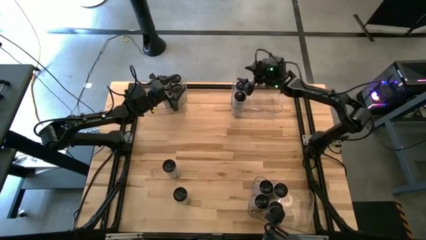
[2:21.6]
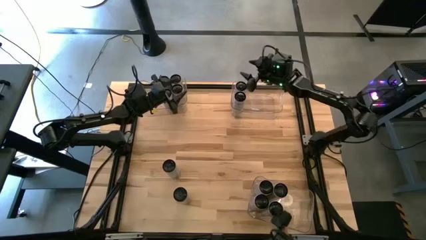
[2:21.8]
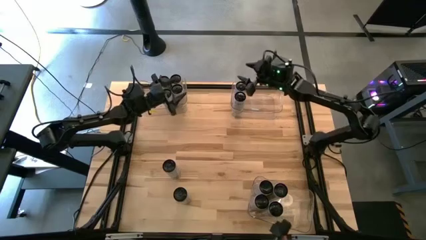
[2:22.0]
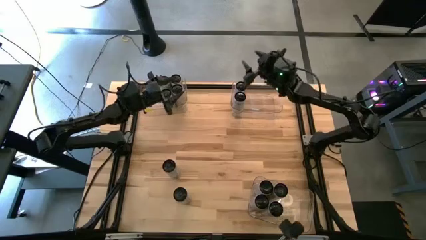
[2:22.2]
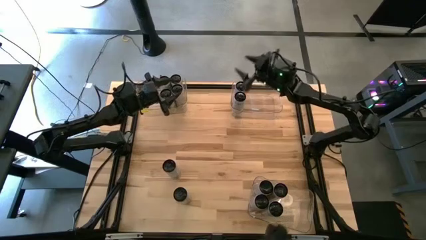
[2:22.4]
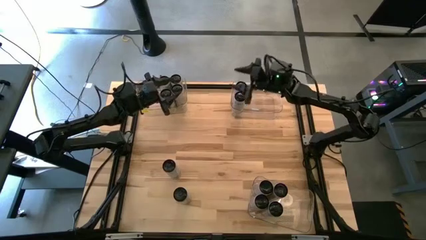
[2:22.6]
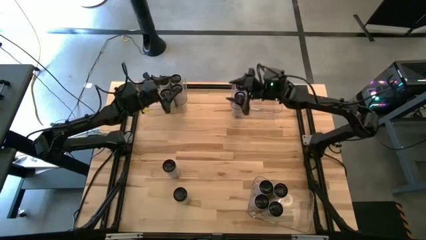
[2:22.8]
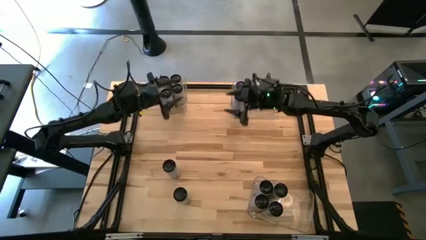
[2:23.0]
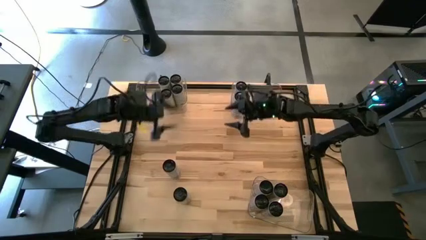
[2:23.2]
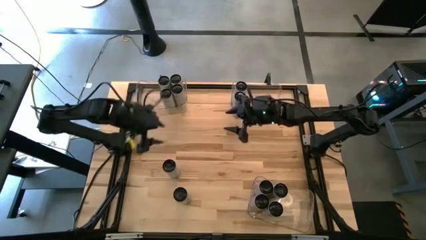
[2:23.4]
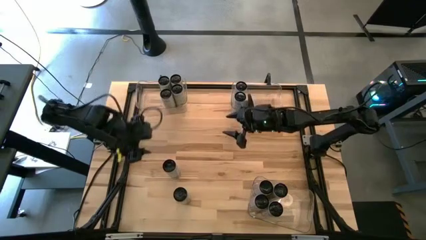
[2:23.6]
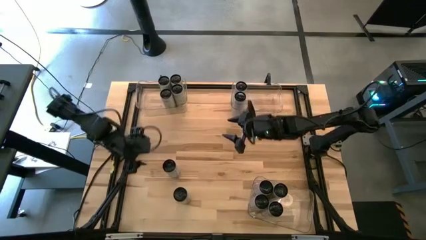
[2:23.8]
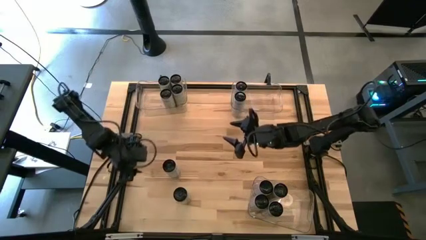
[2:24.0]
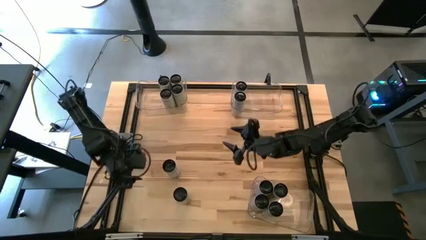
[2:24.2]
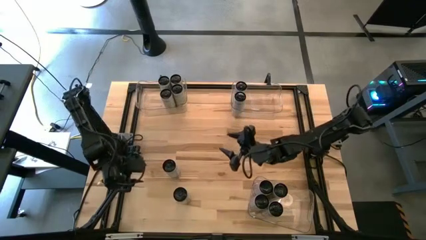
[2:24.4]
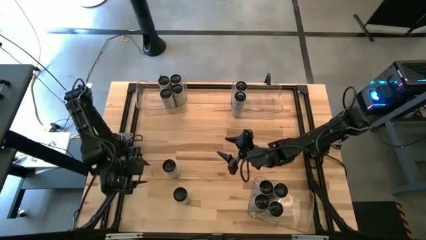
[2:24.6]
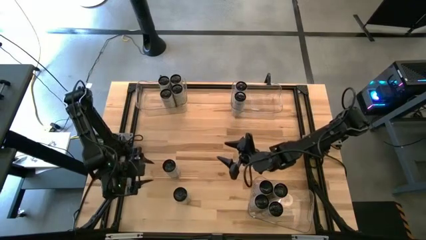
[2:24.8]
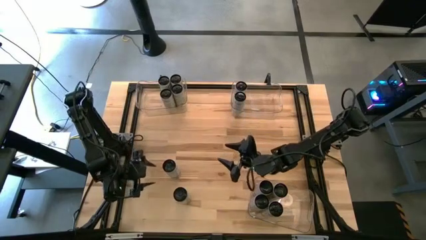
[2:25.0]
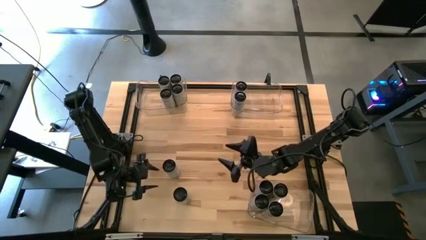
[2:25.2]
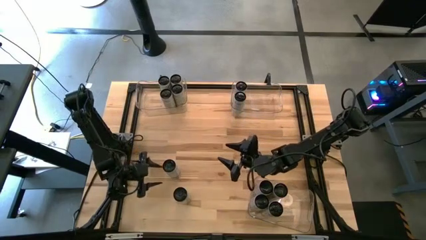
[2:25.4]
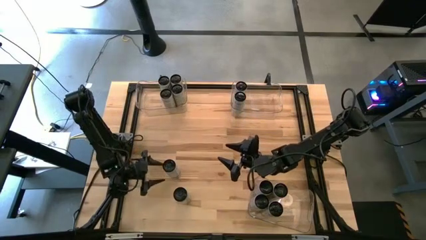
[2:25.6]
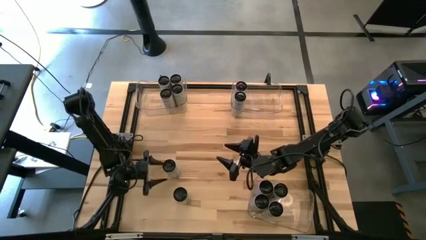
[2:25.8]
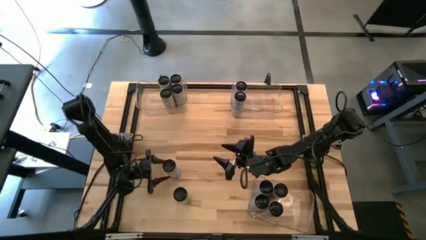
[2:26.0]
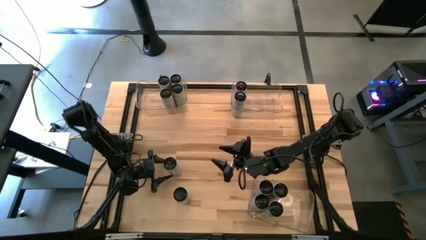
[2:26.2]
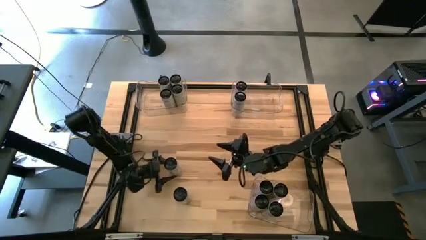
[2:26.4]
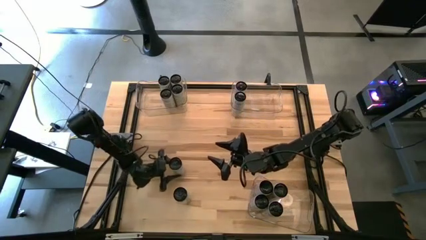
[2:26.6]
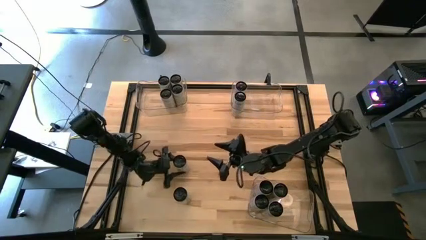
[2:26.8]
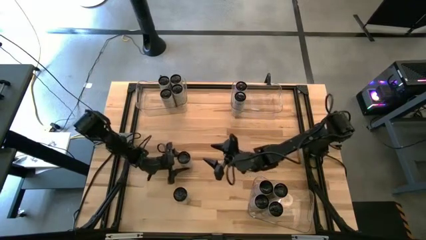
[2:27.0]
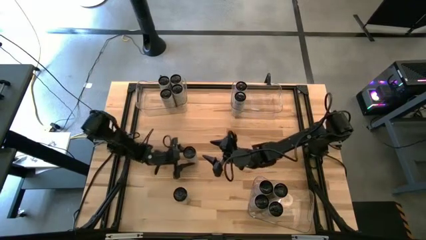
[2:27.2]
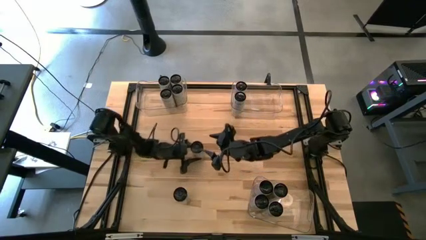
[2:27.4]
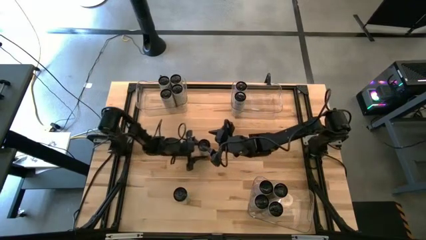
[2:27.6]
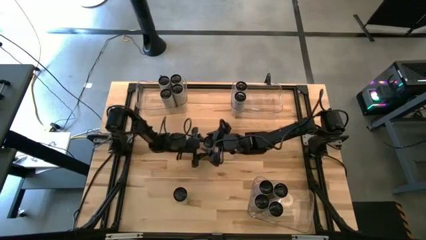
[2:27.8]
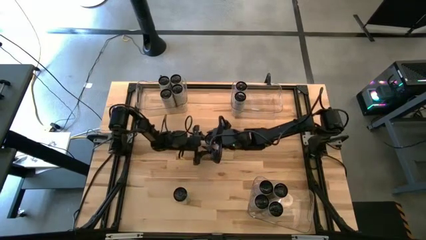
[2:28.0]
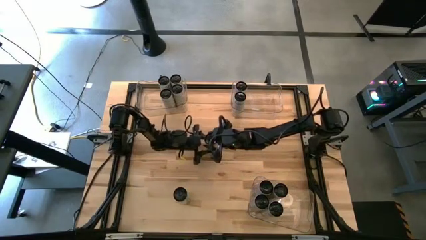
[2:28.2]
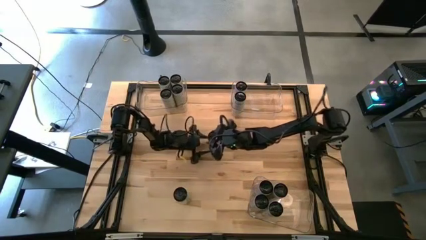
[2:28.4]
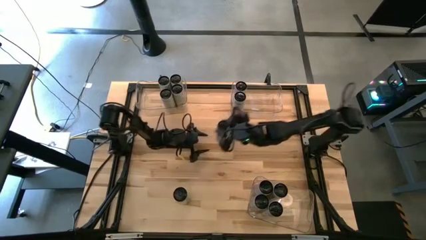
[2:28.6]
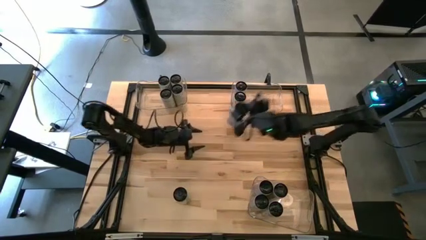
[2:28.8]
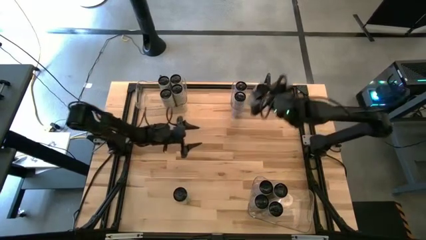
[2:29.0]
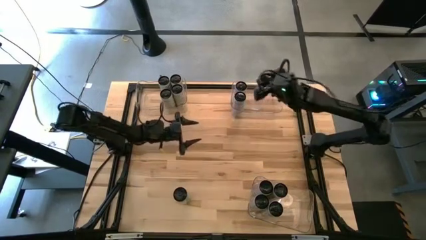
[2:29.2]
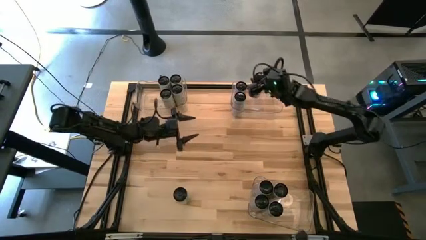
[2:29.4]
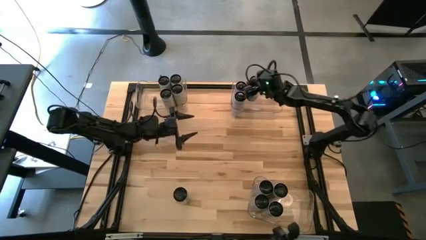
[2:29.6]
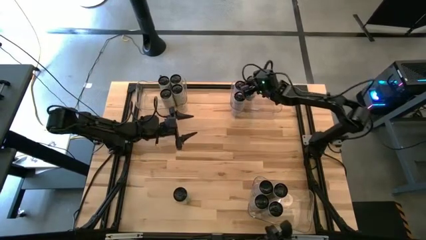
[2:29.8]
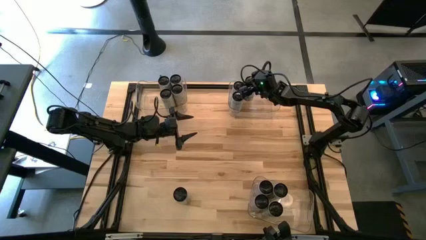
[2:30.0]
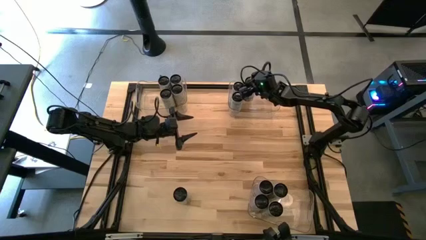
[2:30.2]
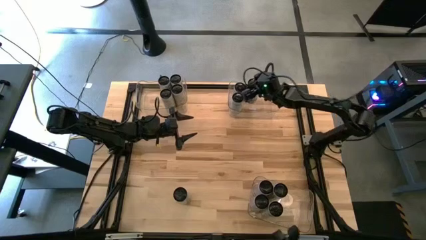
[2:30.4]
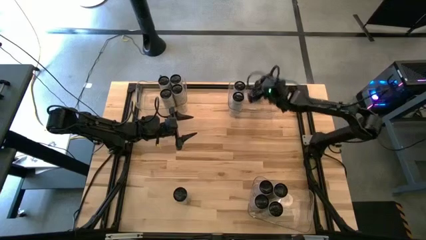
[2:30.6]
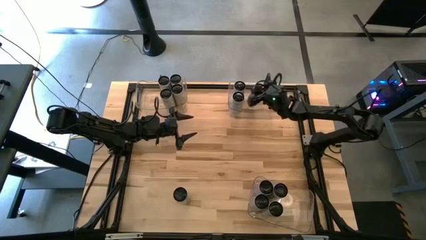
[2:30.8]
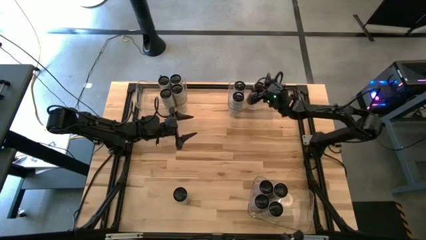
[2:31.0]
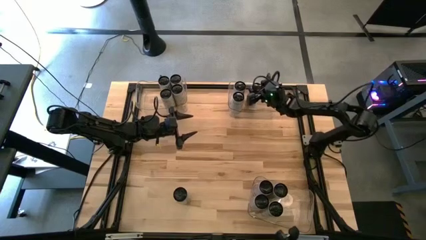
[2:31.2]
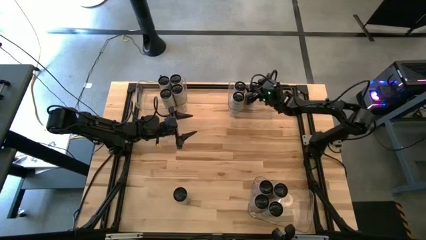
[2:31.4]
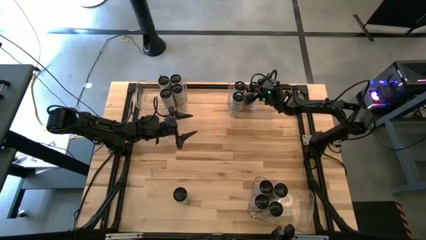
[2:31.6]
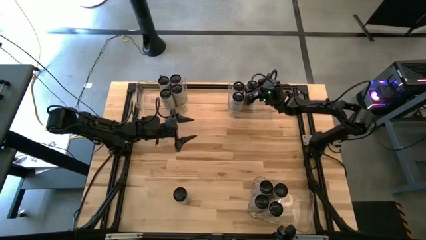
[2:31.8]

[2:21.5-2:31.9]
Task: Sort soda cans
Put the white-blue soda can into the top right transparent bin

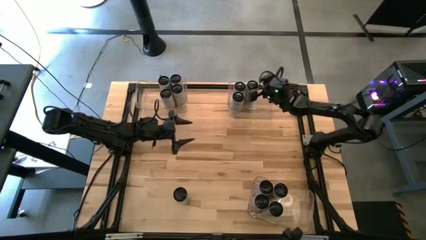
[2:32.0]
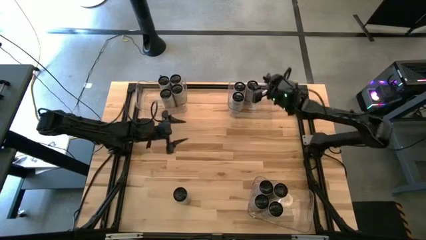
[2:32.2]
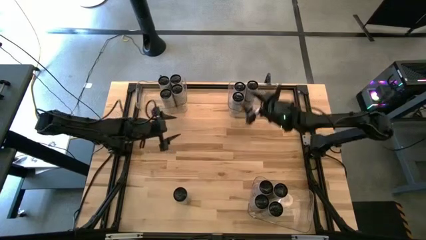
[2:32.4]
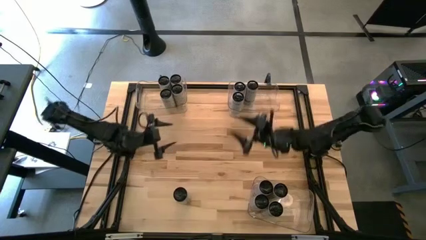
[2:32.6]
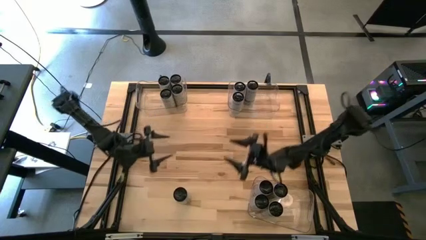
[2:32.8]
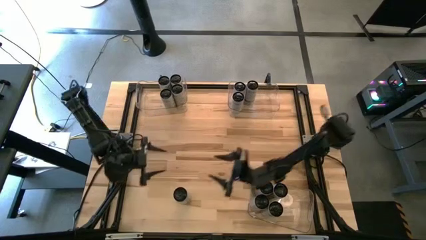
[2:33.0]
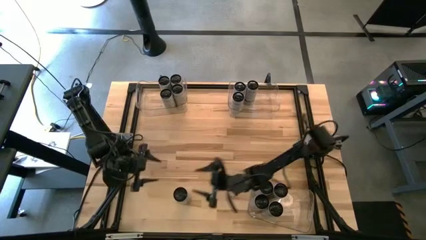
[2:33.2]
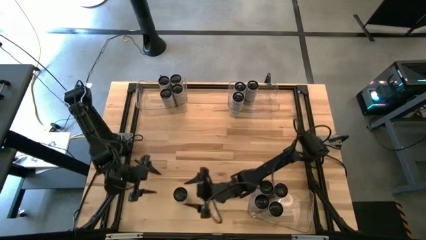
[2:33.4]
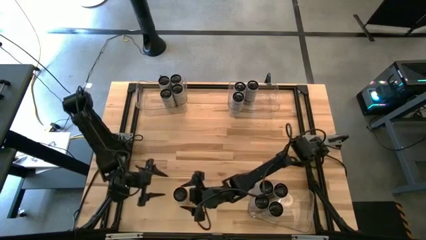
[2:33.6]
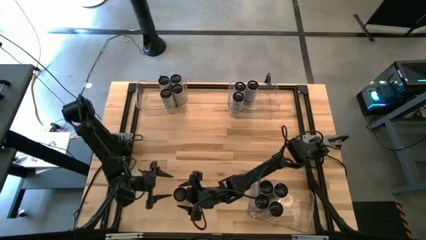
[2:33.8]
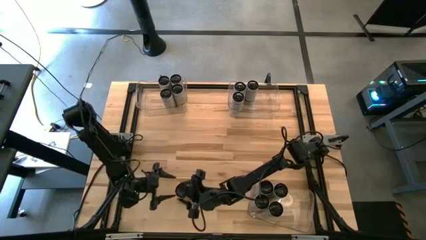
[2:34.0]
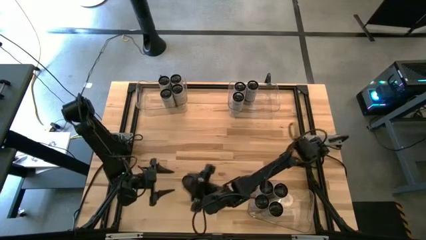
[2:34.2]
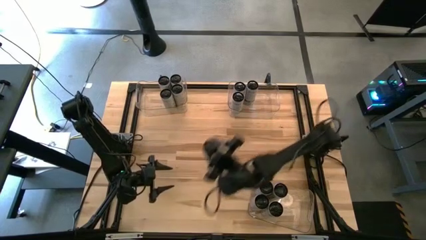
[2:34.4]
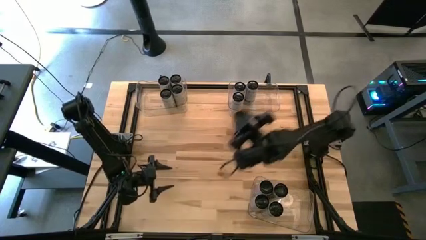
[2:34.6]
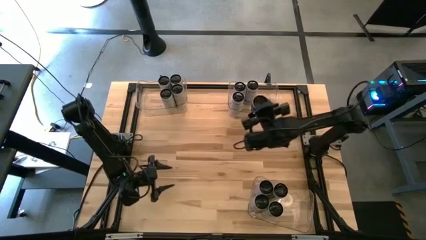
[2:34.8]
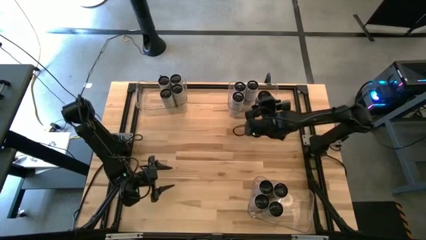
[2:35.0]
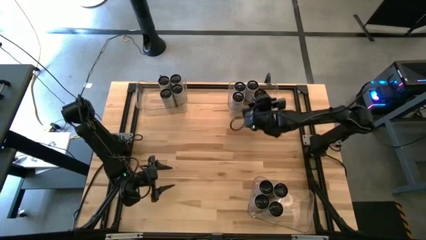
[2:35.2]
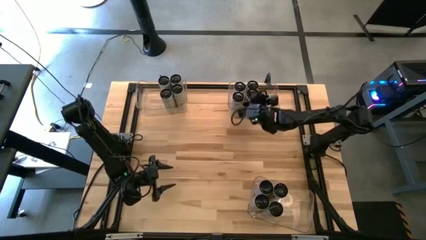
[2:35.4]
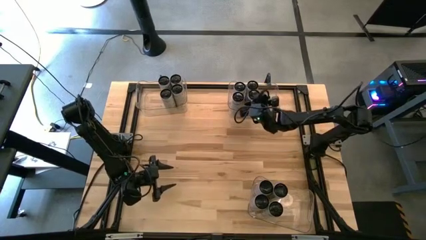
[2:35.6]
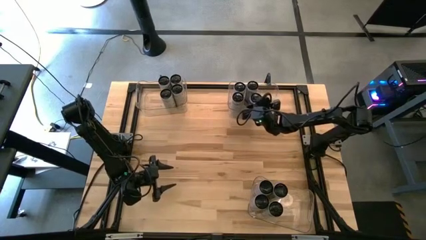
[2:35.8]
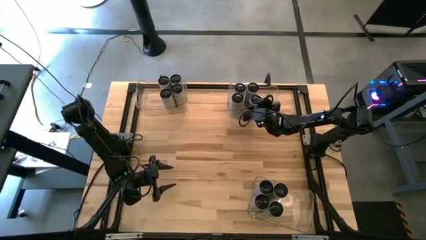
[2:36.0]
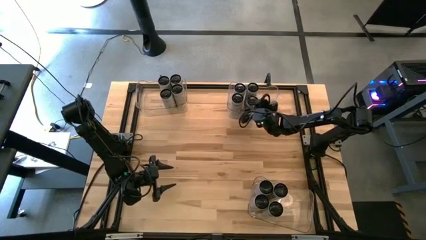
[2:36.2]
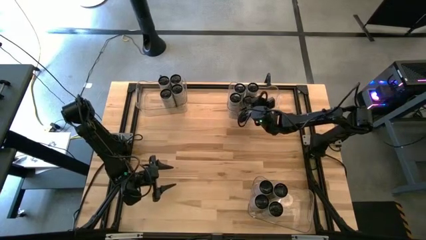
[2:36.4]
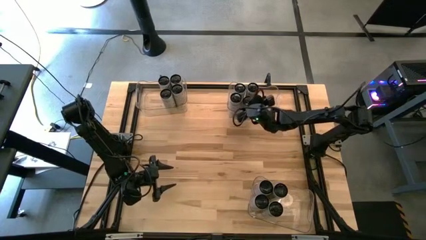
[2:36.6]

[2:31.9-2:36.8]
Put the white-blue soda can into the top right transparent bin

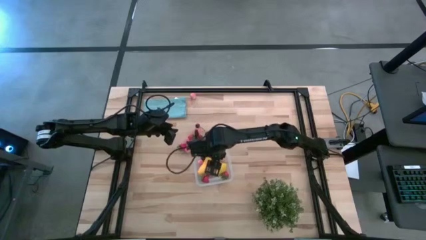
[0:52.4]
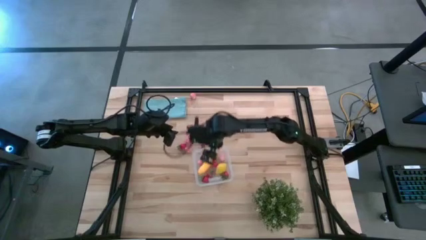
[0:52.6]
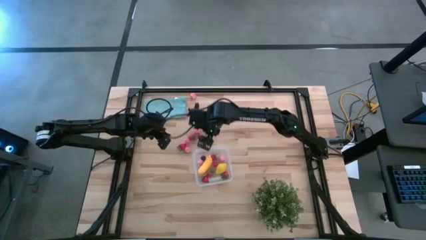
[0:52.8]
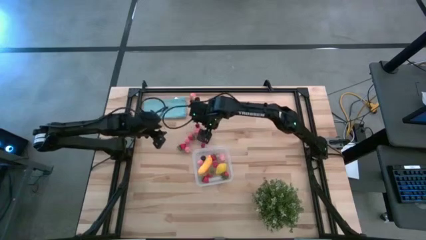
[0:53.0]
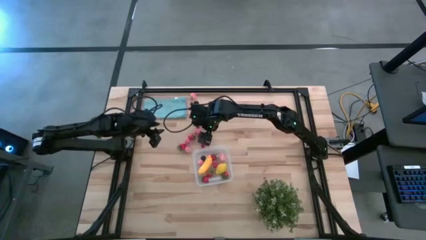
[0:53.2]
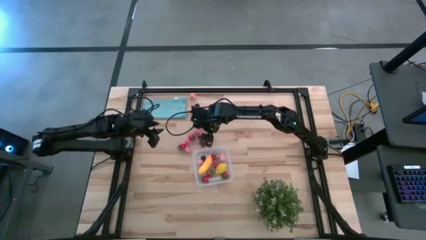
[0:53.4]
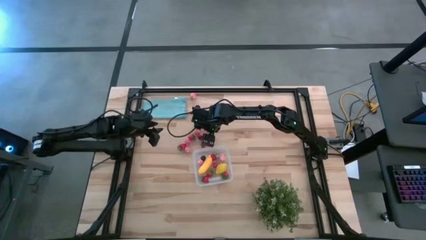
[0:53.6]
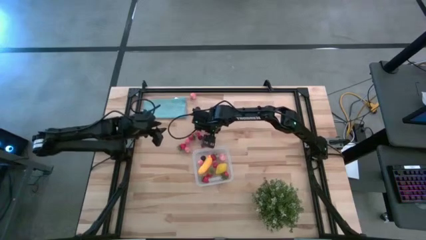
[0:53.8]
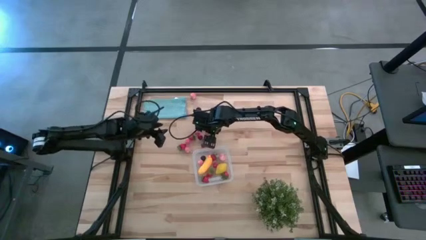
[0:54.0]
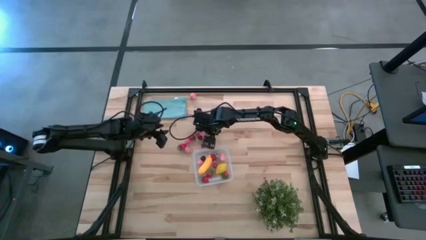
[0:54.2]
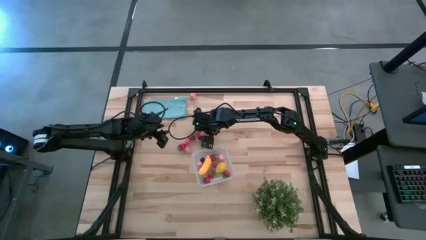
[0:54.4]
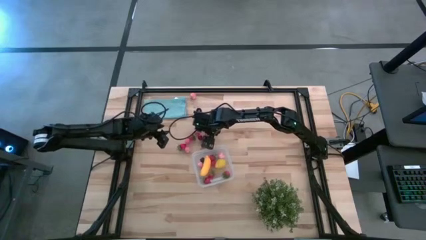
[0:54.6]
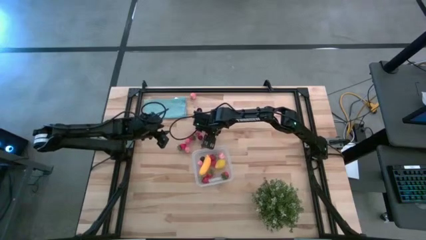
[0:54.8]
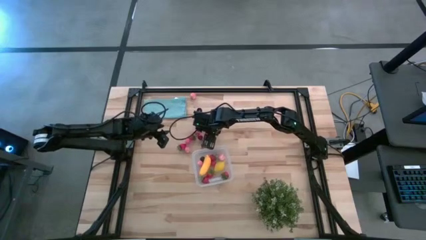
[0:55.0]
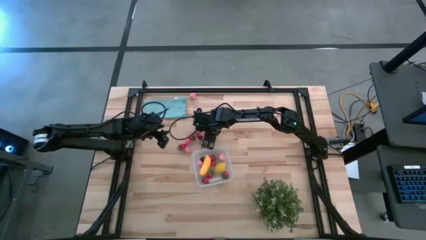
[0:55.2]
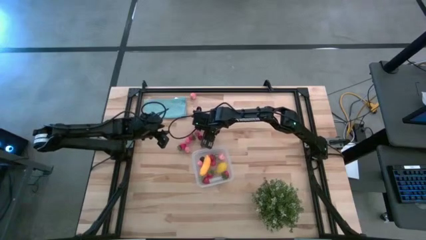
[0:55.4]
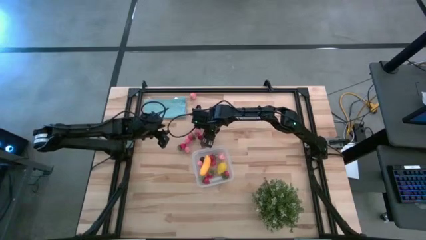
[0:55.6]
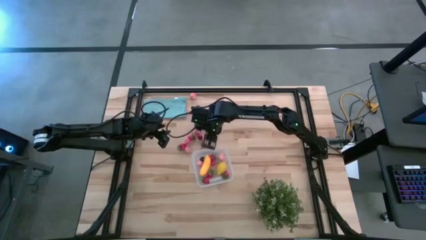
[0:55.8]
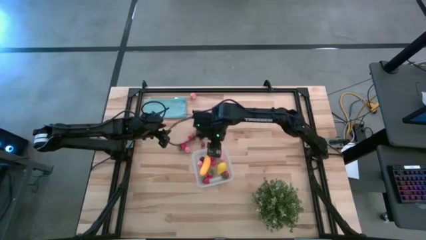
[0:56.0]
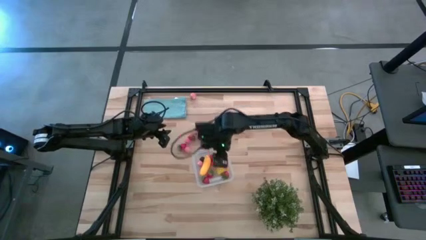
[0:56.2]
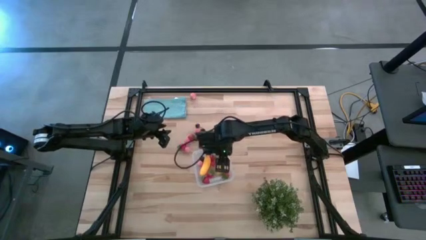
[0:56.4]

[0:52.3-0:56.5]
Task: Pick and placing Produce into tupperware
Put the red strawberry into the transparent bin
